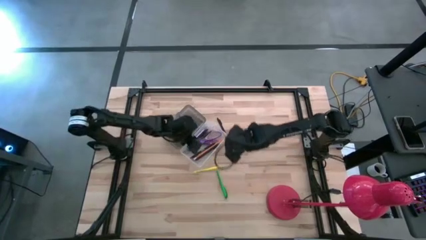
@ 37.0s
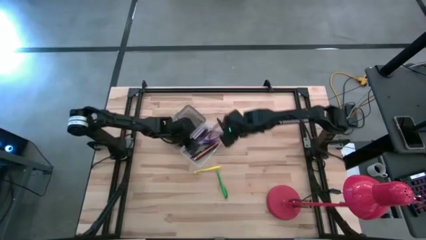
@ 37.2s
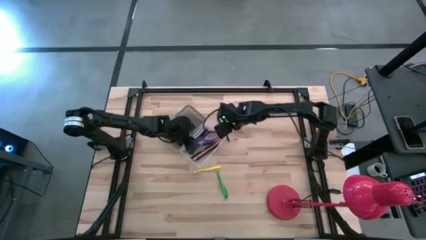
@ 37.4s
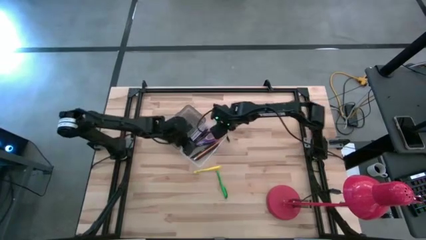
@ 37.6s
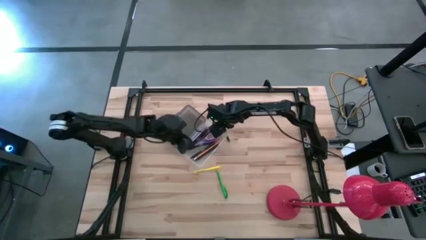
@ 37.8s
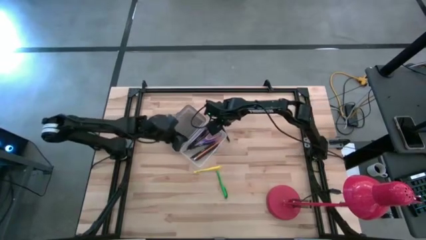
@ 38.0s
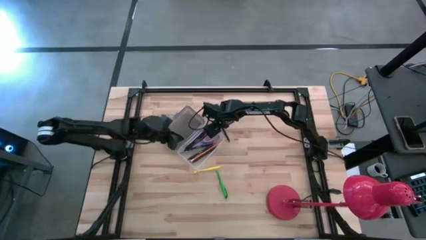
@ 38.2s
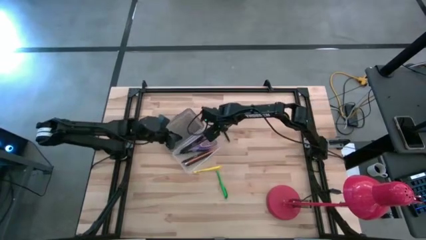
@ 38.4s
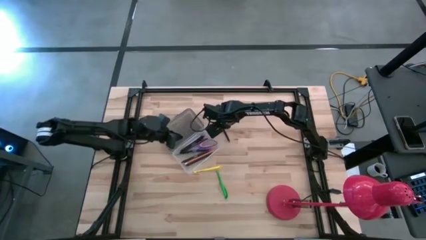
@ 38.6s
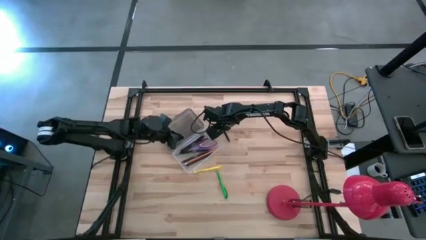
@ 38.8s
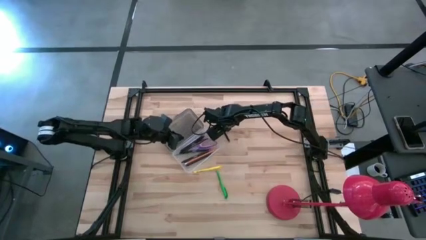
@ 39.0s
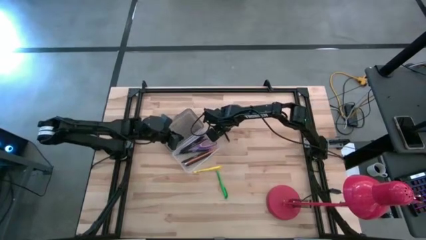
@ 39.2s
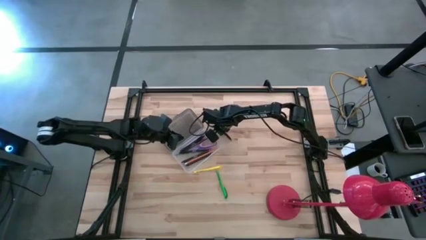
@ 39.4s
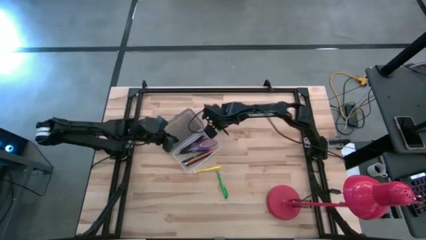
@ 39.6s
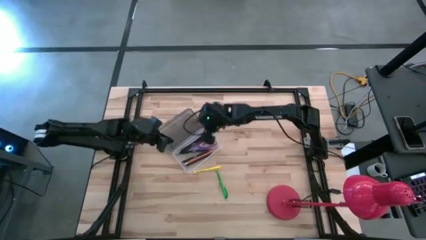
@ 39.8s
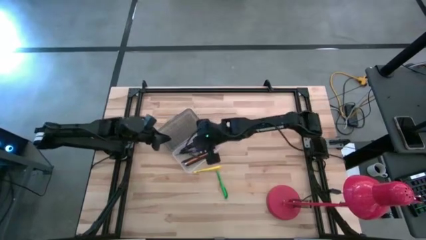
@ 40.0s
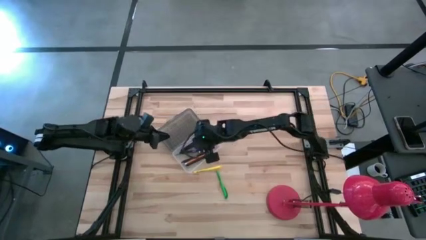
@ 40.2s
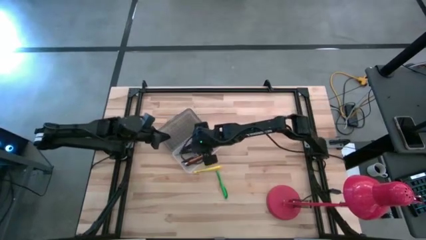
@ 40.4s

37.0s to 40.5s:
Task: Pick & place school supplies into a supply box
Put the black pen into the transparent supply box

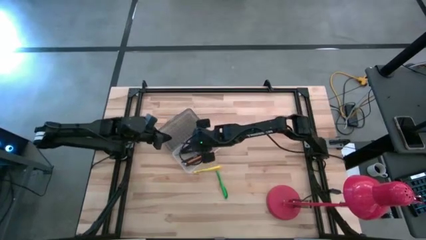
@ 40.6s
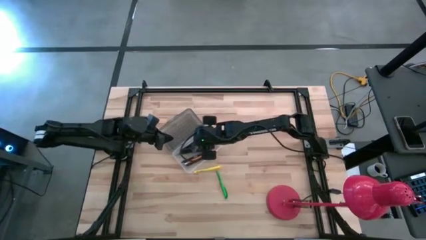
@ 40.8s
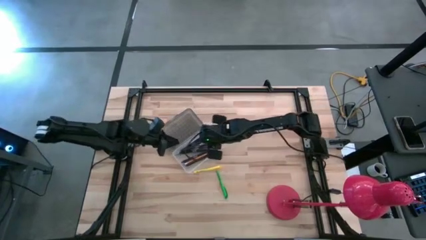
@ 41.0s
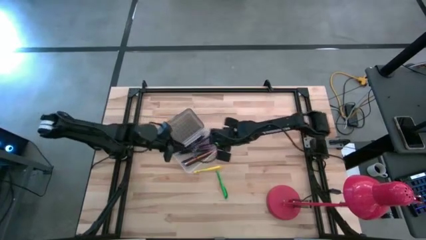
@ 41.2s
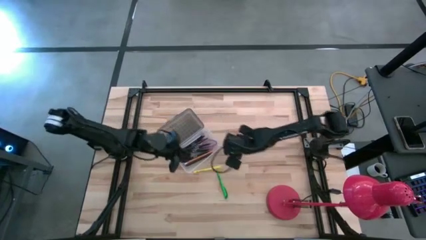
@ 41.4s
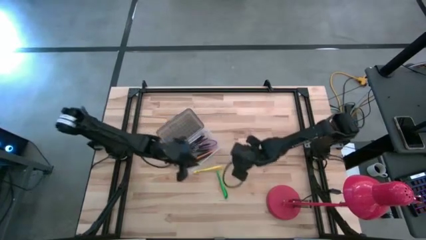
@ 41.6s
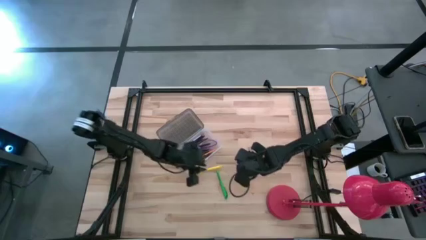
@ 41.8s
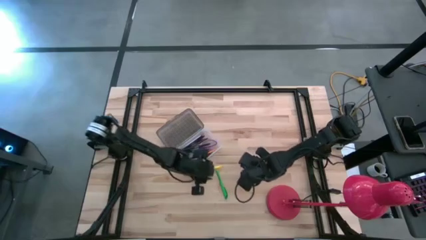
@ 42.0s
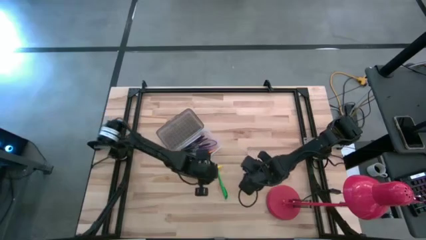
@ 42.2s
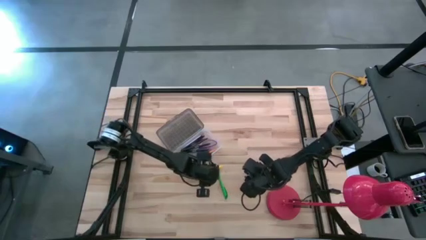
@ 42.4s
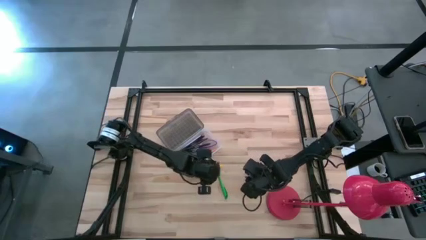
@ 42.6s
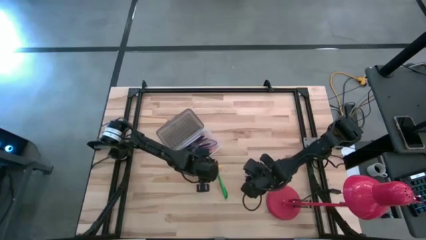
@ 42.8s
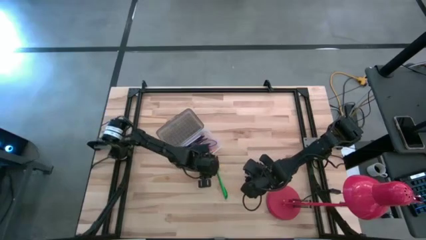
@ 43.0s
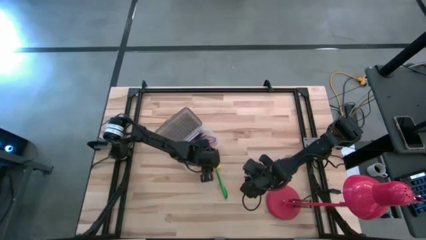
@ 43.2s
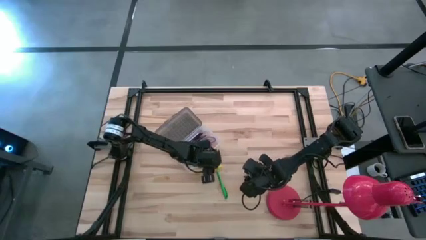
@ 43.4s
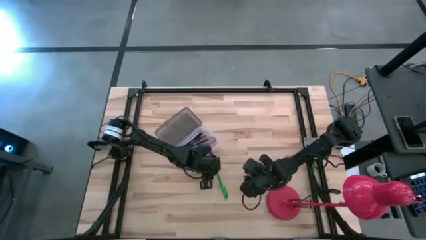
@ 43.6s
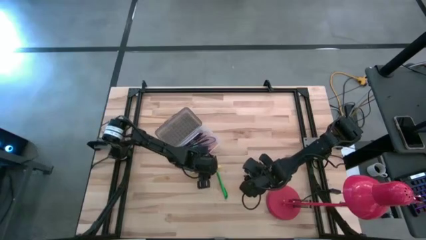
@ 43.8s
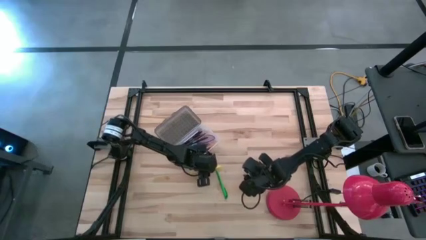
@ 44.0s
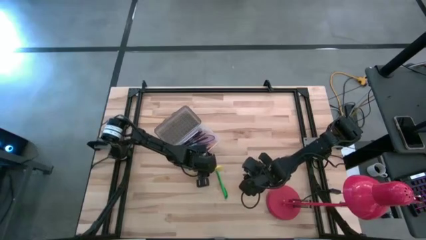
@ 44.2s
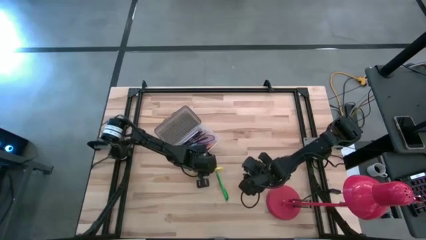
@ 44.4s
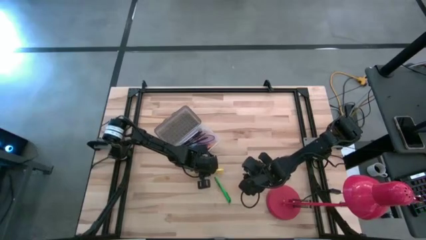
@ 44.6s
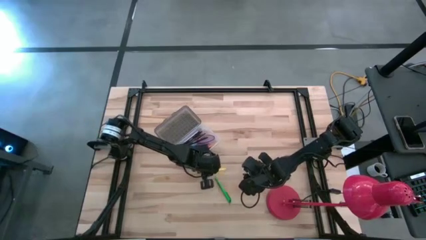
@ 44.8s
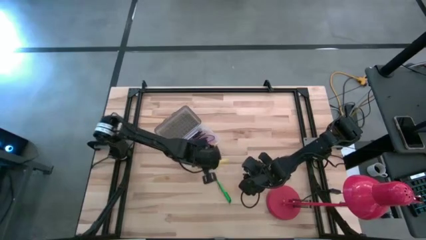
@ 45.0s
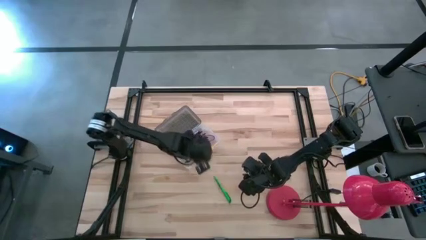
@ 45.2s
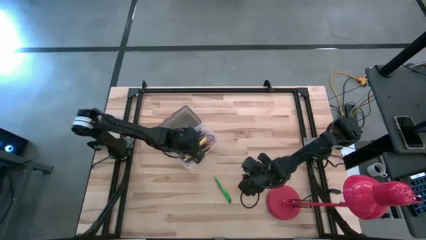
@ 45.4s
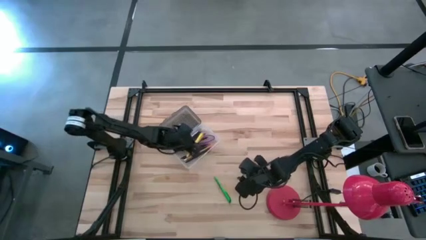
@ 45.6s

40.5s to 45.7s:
Put the yellow pen into the transparent supply box

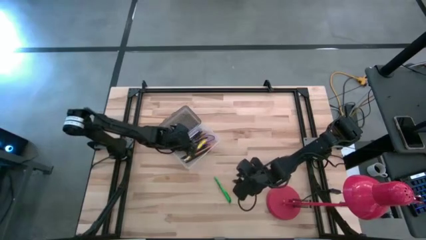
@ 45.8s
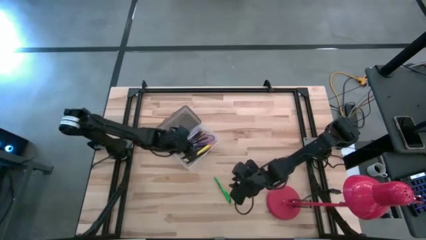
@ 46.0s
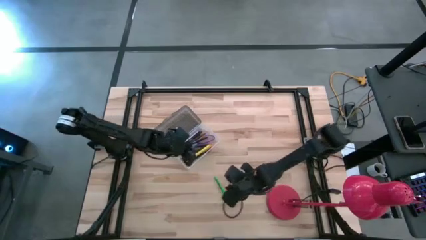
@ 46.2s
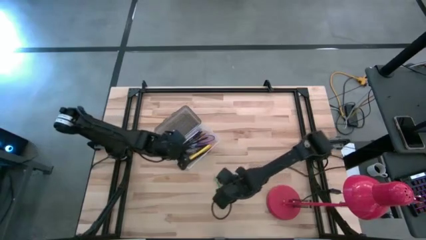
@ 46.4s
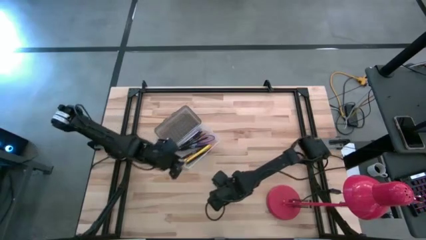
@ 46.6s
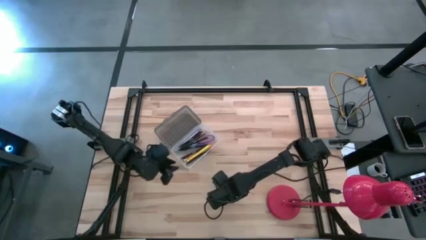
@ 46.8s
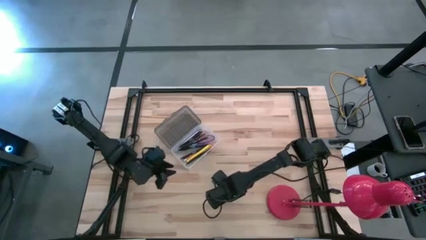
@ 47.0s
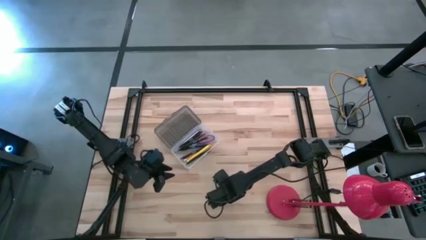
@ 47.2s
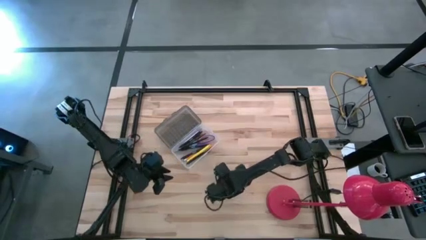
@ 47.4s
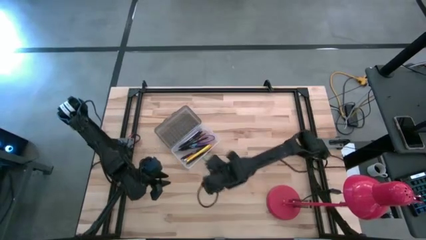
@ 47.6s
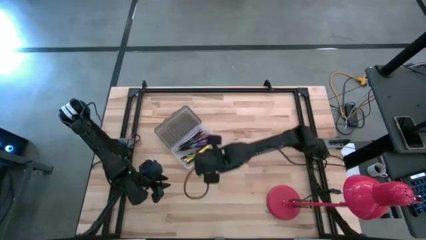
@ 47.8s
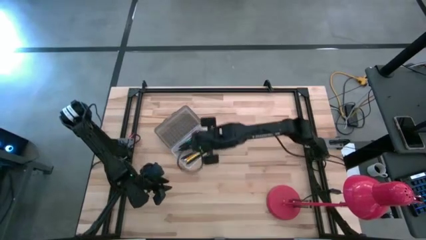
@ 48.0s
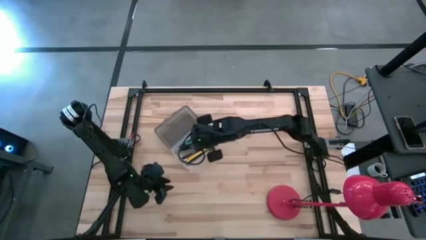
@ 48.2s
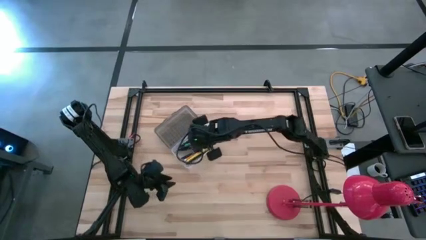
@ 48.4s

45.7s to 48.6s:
Put the green pen into the transparent supply box

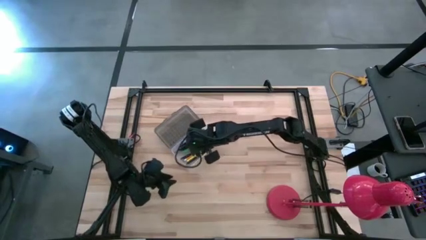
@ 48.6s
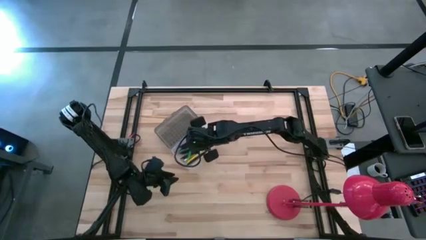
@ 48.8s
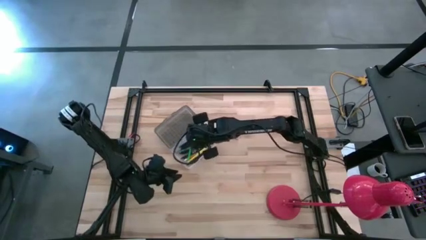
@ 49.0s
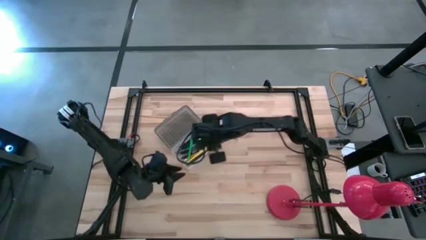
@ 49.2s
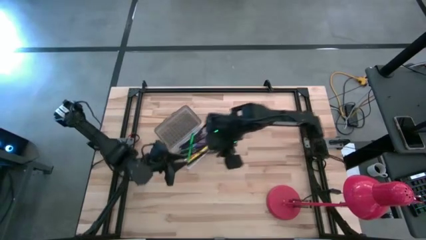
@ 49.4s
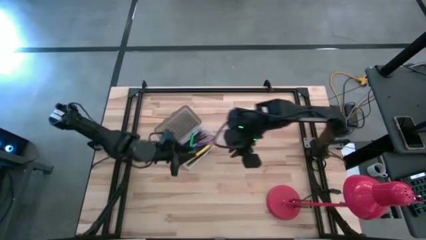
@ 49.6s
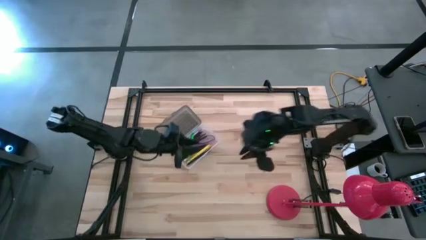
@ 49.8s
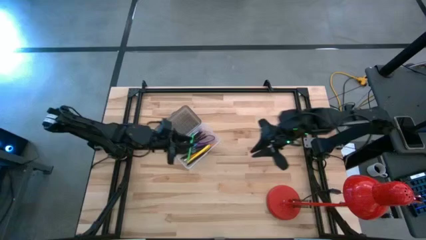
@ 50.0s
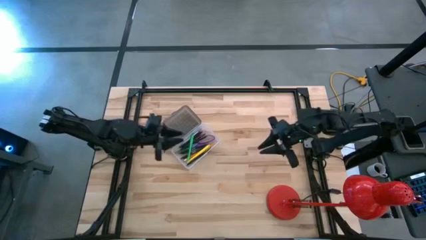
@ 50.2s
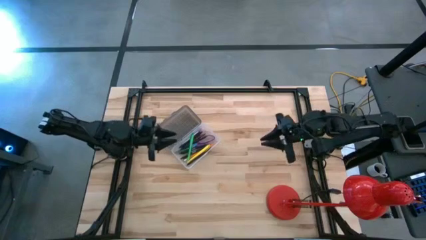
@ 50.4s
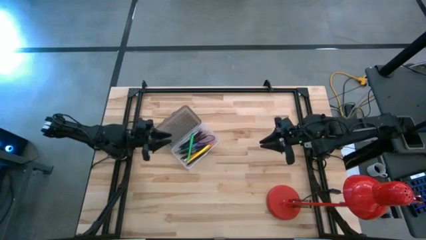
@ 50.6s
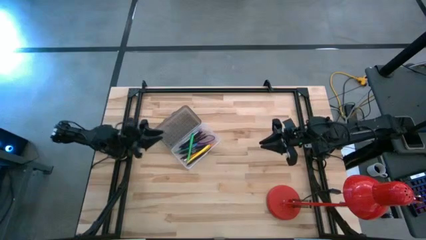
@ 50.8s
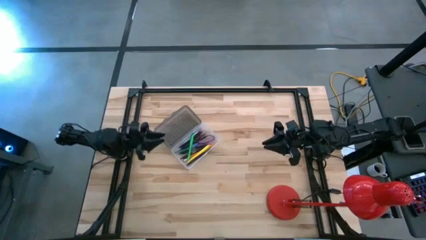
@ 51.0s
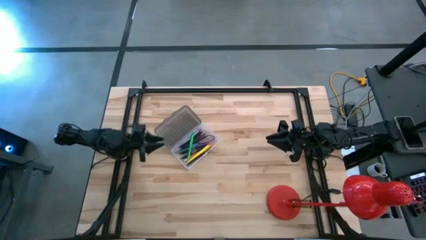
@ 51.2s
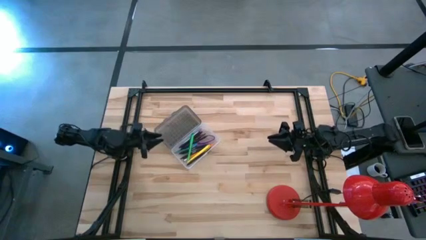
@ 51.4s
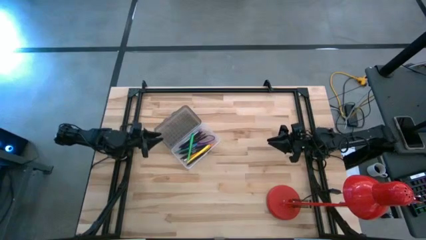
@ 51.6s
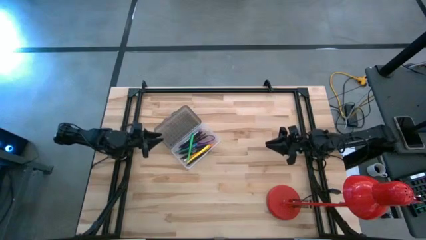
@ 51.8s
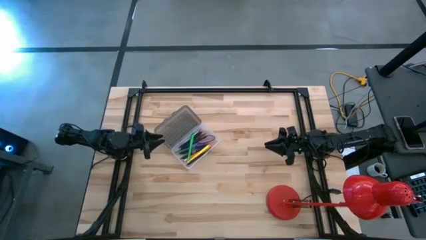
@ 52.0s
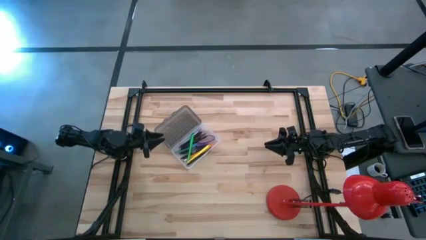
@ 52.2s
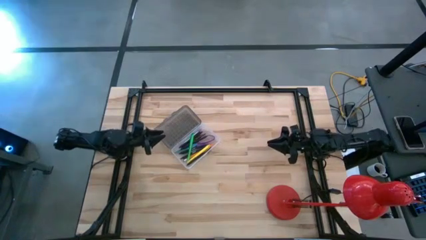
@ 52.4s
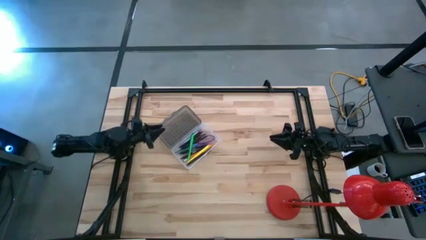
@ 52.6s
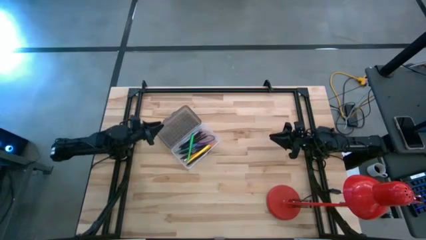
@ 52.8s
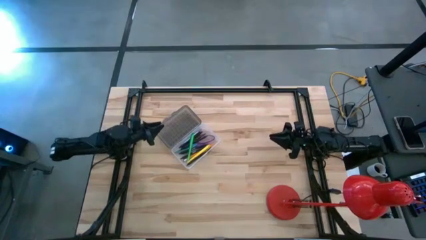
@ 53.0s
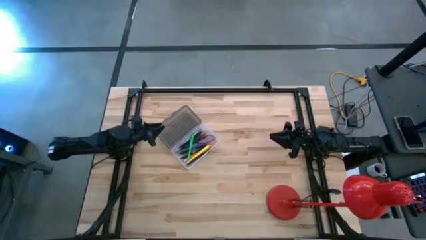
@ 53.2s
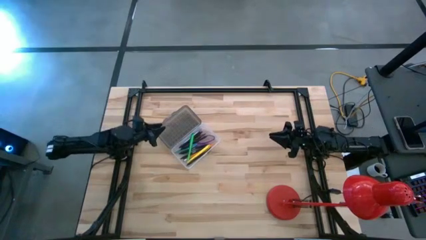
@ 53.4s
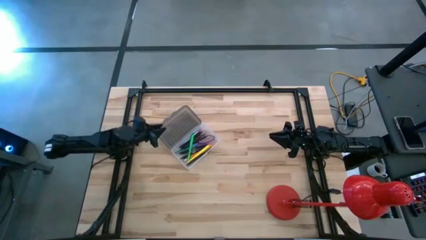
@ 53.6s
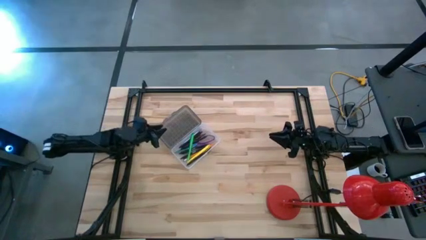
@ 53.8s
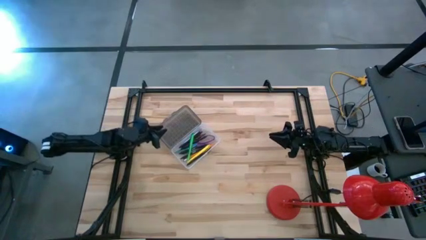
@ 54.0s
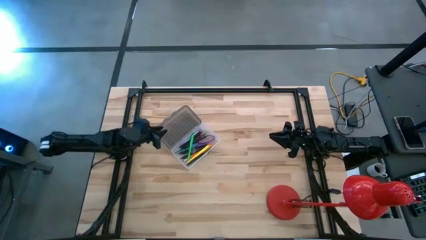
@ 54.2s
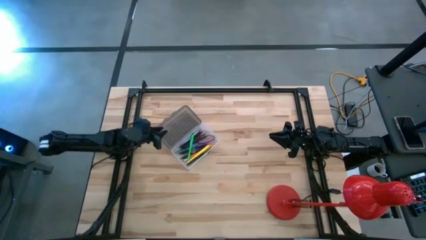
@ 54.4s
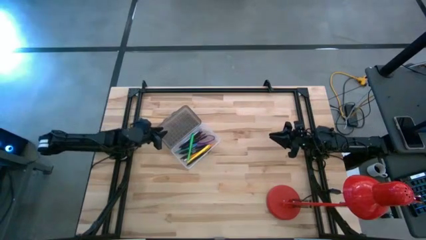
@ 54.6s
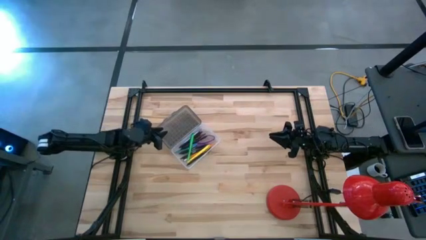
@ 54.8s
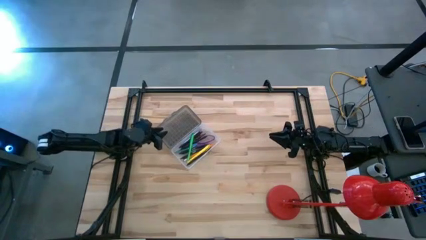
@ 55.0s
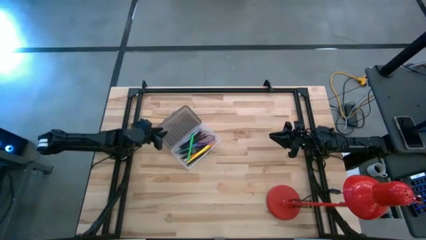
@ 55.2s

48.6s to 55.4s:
Return to Home Position
